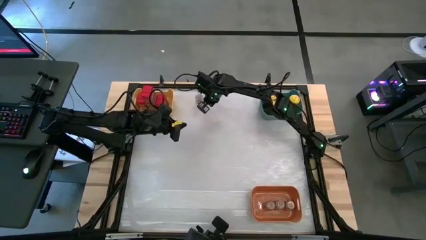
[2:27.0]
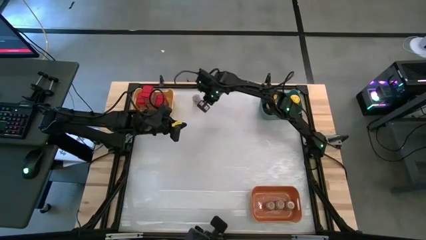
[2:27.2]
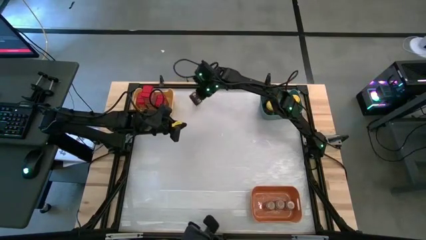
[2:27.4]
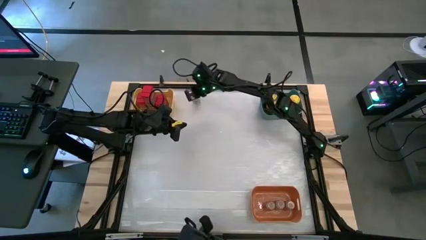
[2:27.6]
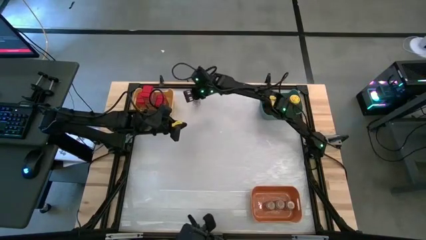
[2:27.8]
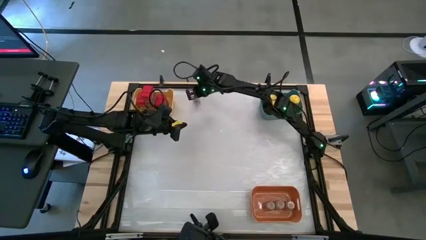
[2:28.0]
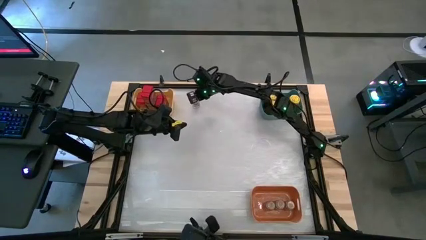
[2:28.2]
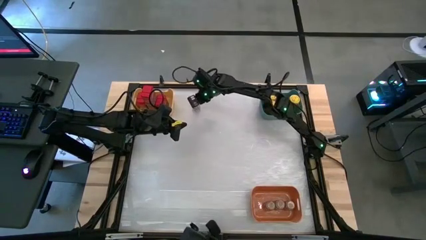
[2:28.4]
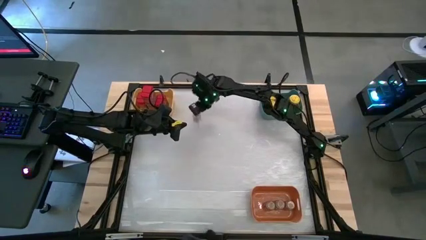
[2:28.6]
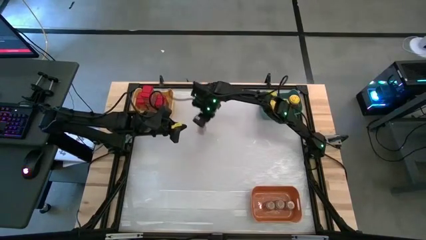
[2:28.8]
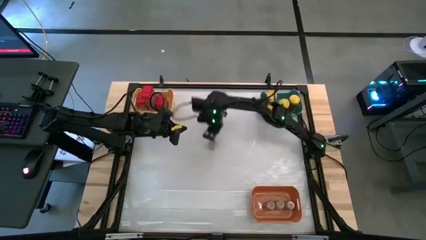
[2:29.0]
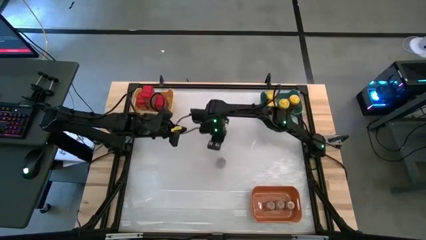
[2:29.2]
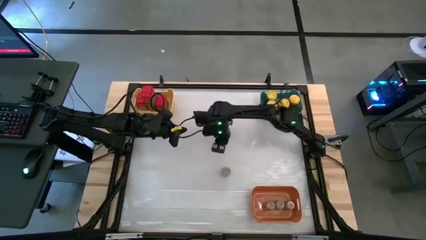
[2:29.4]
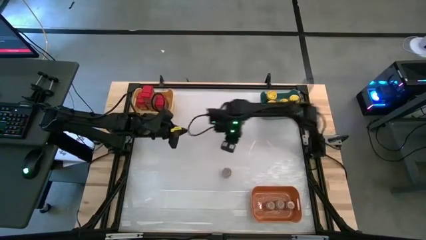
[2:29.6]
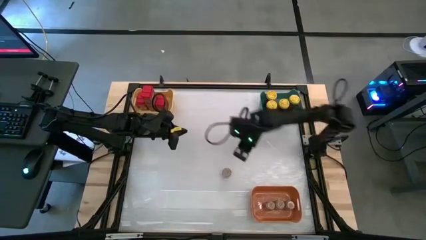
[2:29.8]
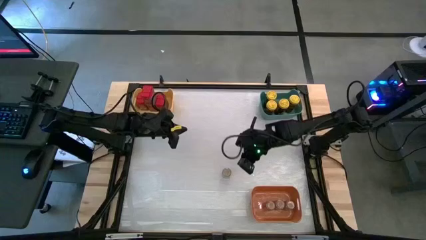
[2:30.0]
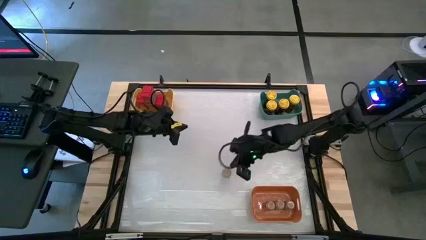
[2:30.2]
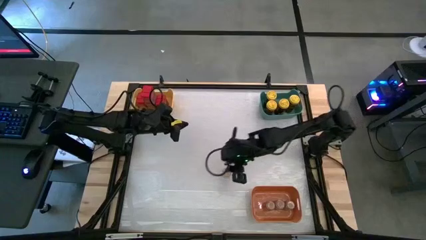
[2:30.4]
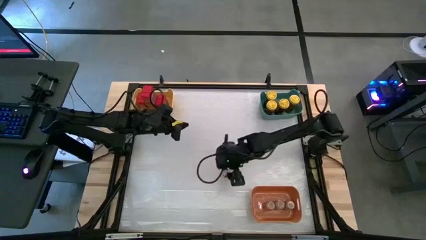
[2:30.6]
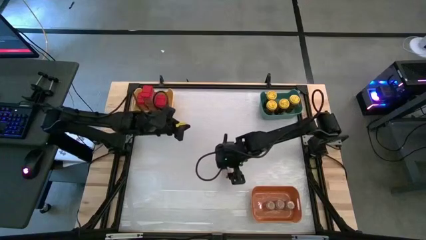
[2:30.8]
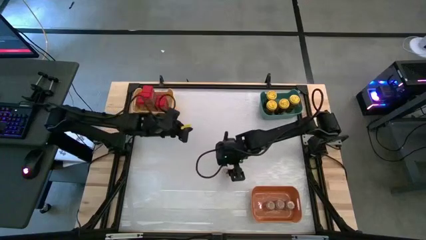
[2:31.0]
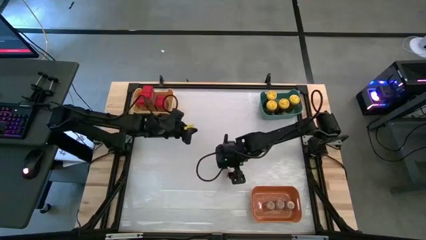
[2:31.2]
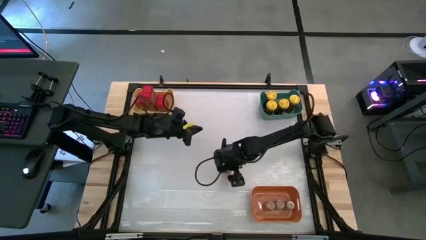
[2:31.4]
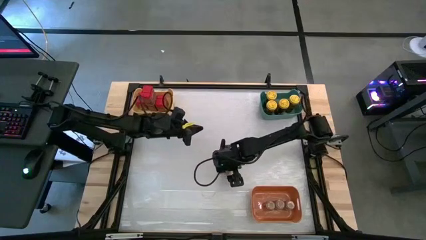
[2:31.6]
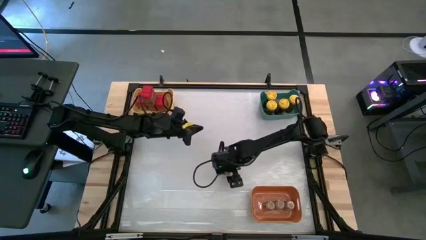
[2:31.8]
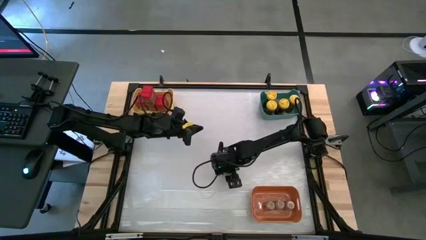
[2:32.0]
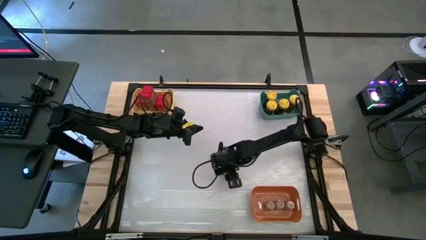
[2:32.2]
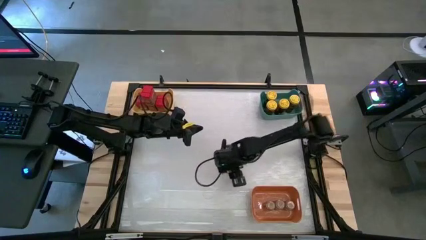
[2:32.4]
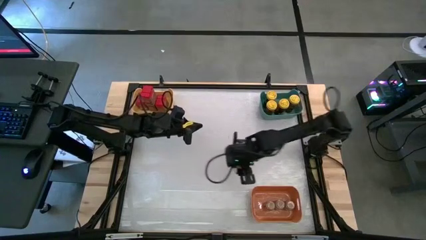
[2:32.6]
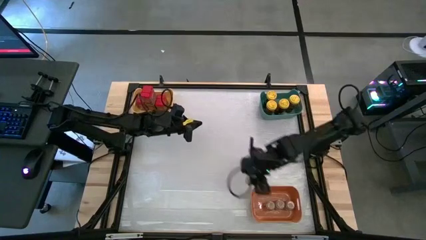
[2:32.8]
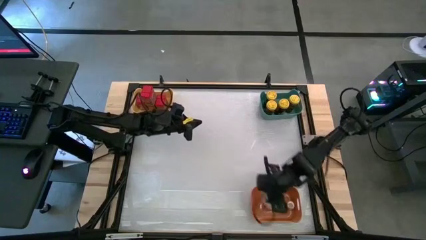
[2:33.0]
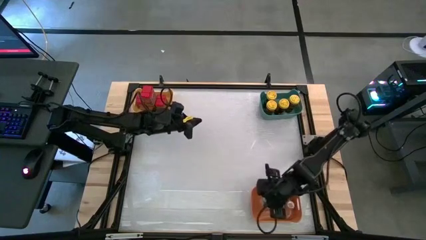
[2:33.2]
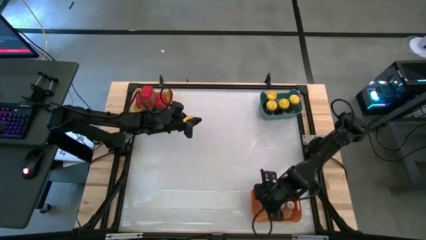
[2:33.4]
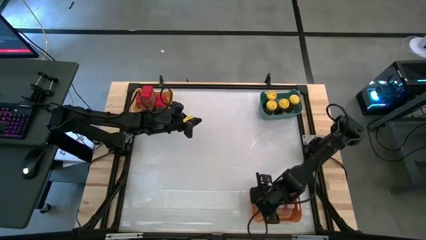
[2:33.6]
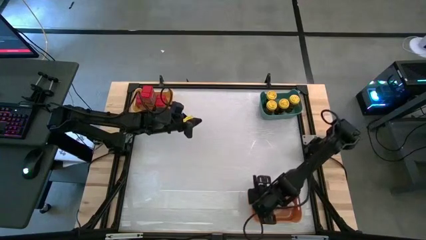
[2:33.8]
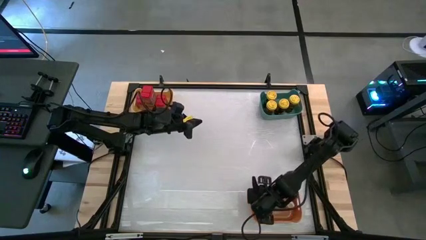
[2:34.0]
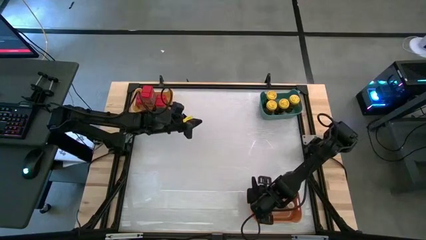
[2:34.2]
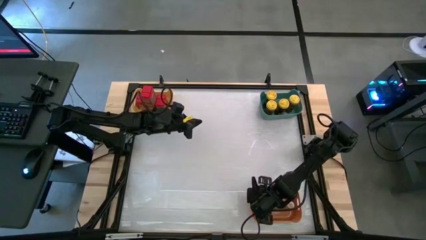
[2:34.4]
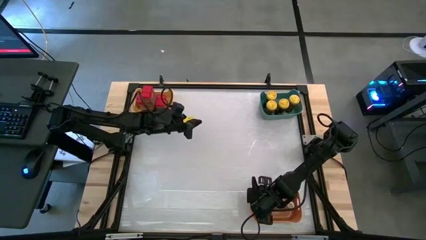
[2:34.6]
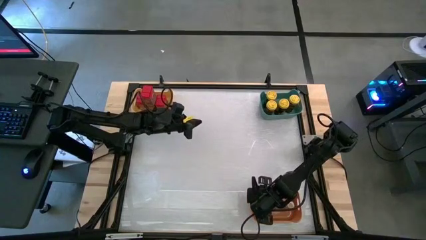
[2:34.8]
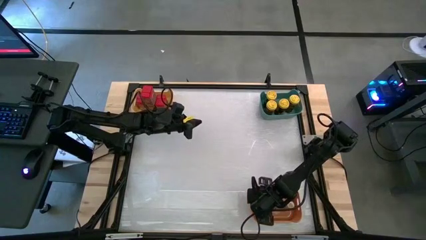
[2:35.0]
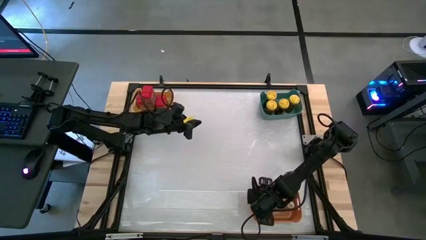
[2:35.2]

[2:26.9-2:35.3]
Task: Sort spices by type
Put the brown seasoning bottle into the orange bin

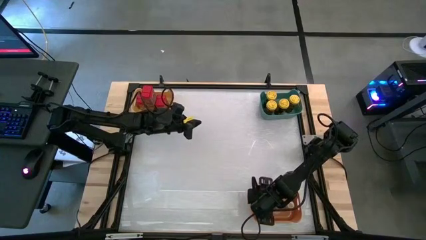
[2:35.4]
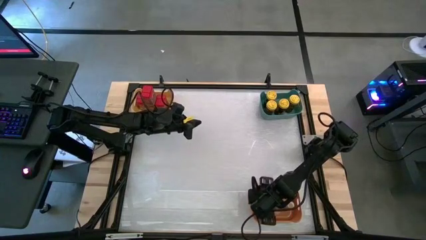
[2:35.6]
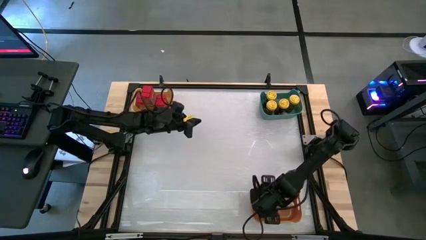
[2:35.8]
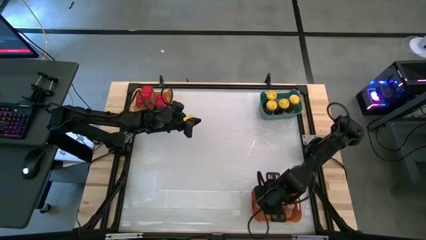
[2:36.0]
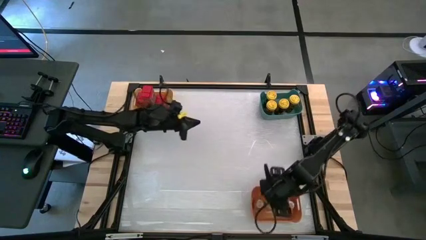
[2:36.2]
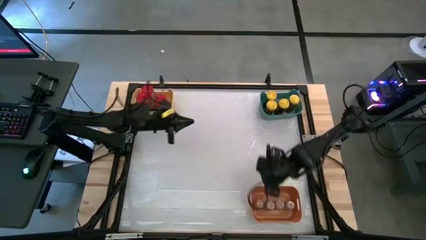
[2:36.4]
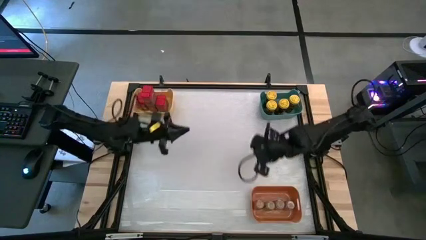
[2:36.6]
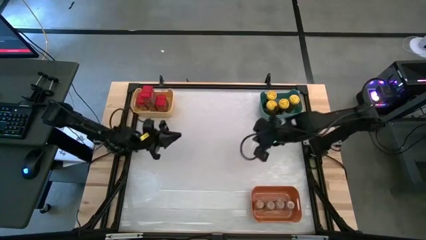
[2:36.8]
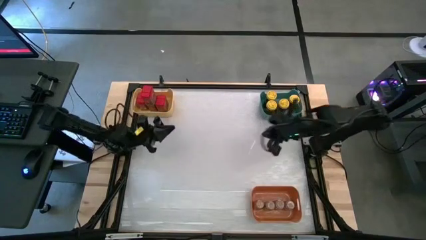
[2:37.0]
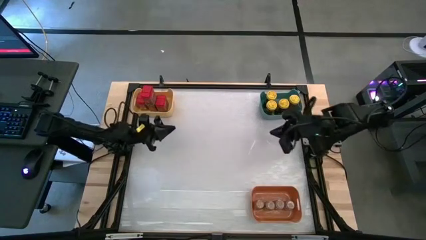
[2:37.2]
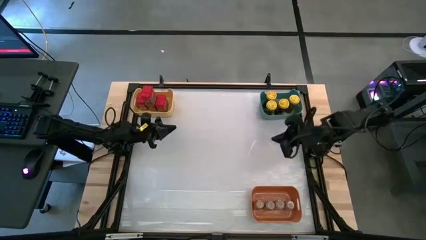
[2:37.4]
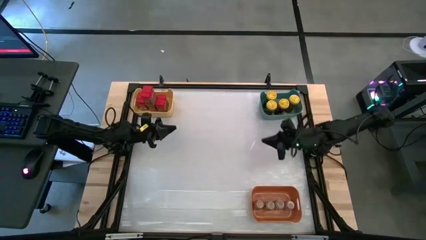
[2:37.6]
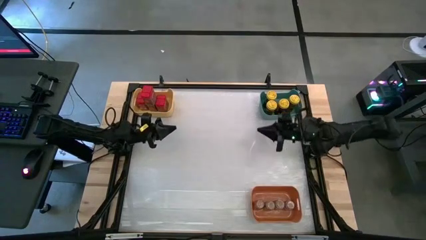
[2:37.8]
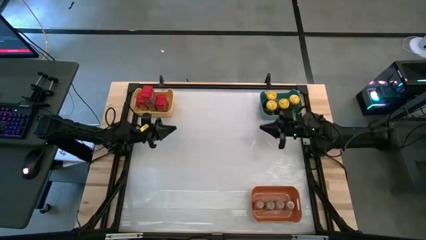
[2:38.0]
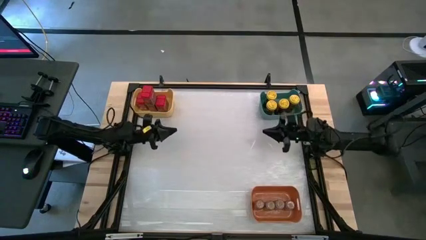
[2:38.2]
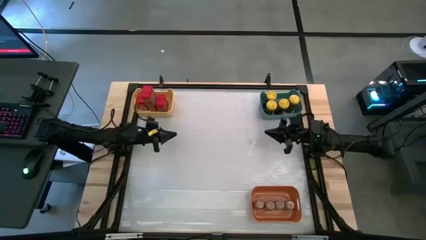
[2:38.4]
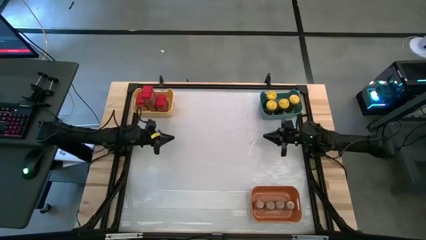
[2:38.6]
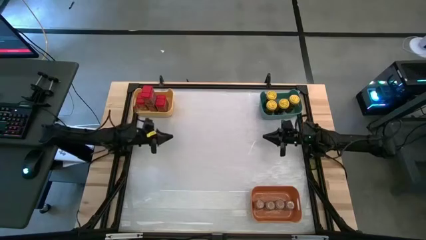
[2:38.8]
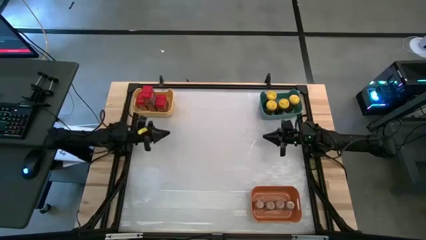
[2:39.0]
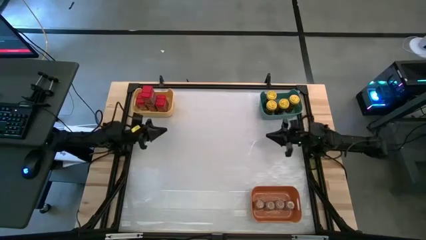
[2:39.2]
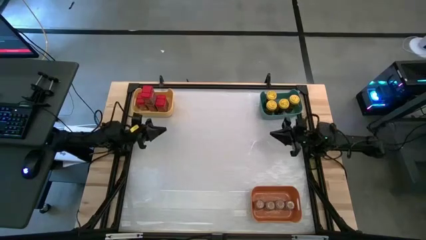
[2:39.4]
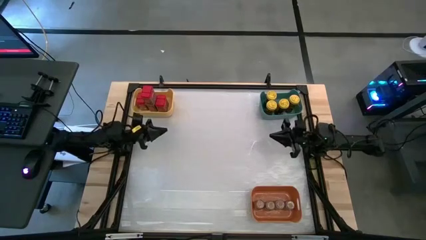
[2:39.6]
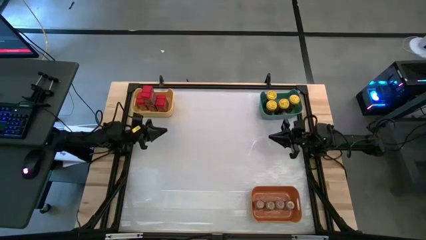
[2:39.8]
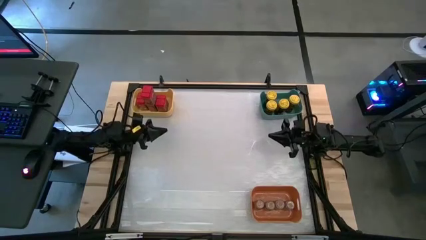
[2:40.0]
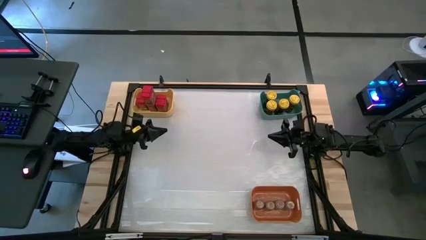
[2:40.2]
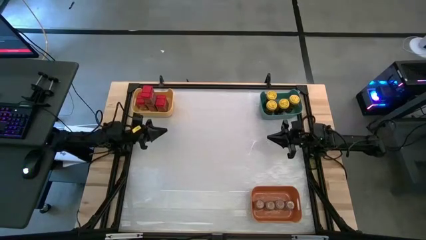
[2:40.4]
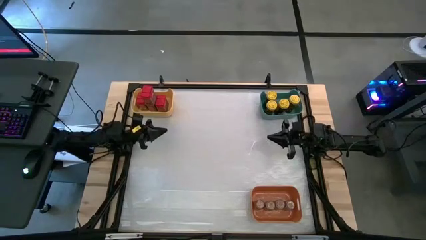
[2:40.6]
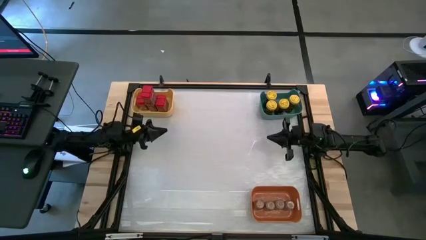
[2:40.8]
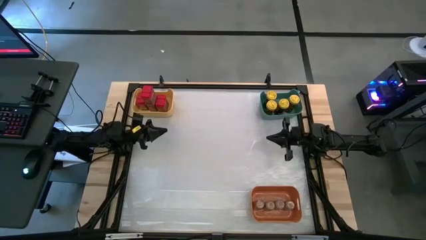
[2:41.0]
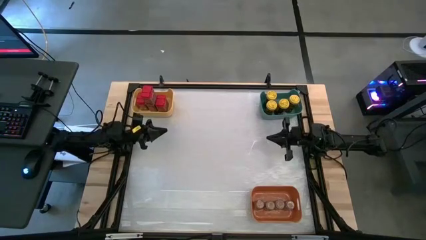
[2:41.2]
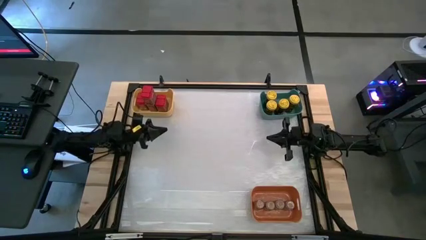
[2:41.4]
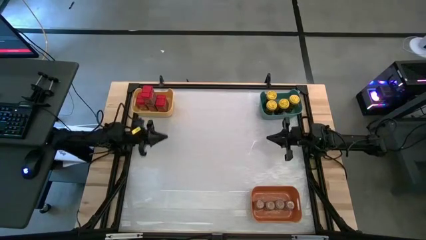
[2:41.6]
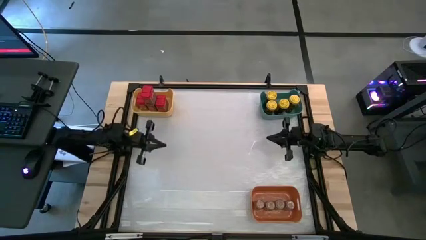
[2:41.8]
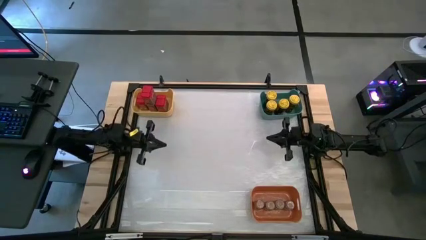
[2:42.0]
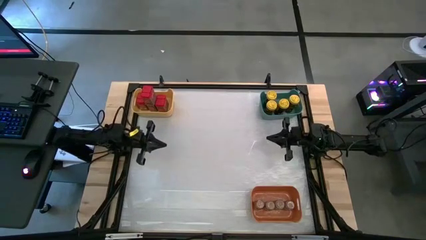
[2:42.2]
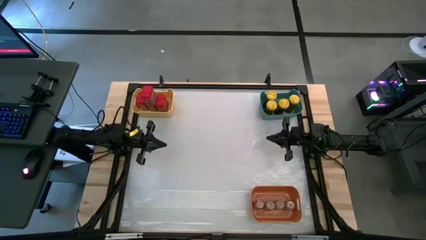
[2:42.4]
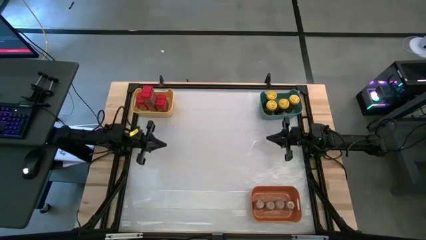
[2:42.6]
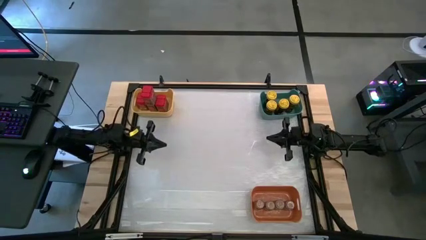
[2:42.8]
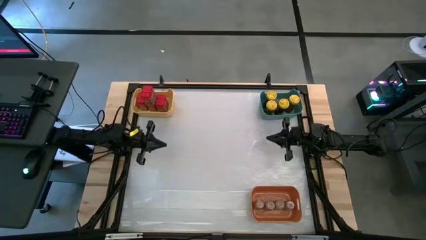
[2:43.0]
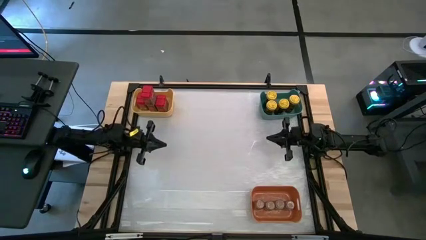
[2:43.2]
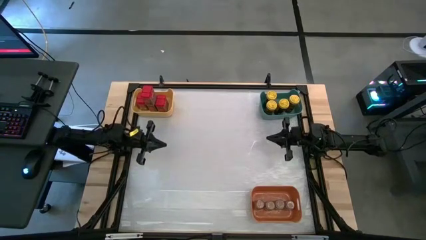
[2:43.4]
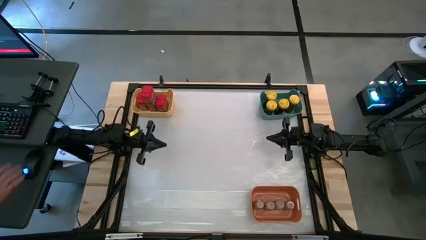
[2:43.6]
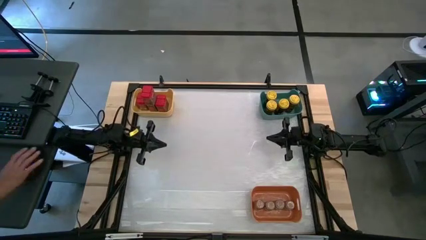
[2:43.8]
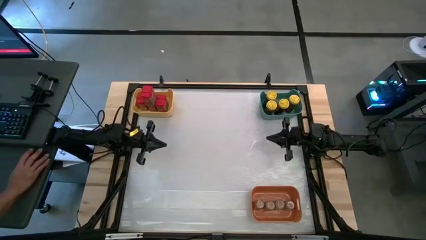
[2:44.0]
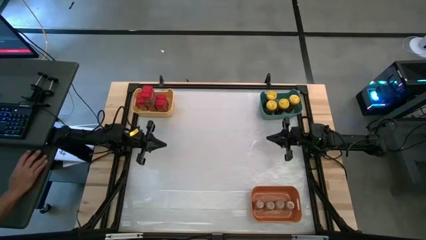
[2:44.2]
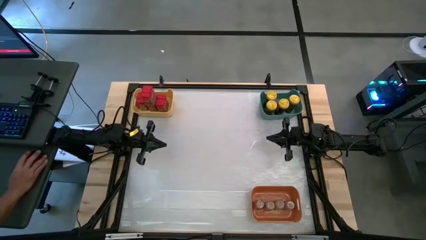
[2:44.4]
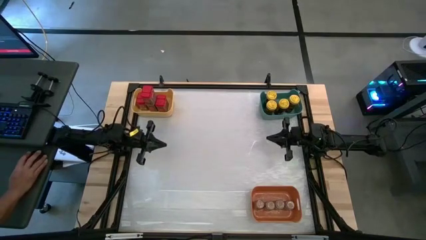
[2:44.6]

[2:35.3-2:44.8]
Return to Home Position
